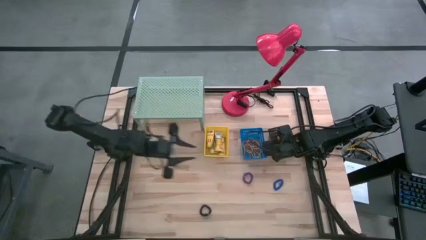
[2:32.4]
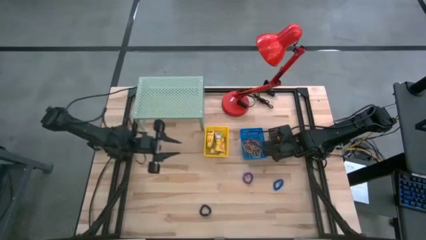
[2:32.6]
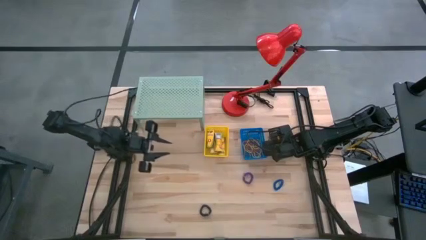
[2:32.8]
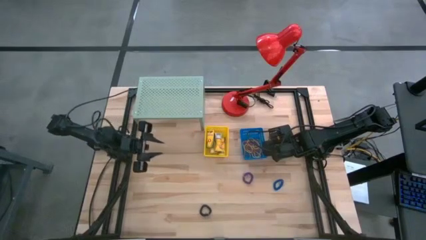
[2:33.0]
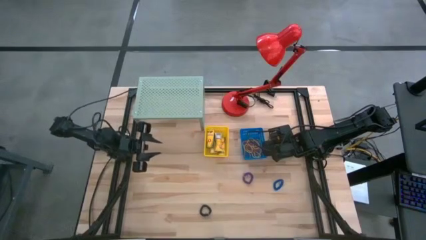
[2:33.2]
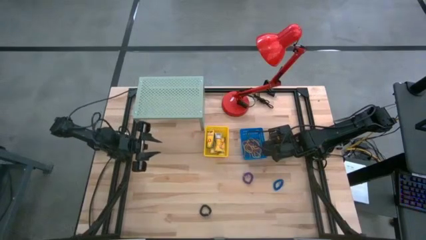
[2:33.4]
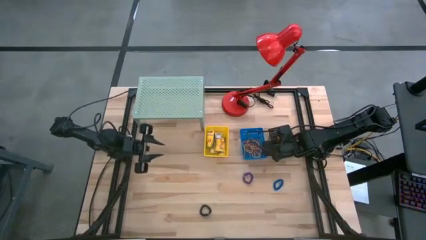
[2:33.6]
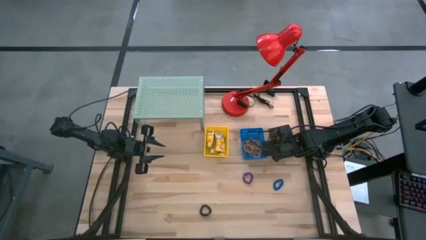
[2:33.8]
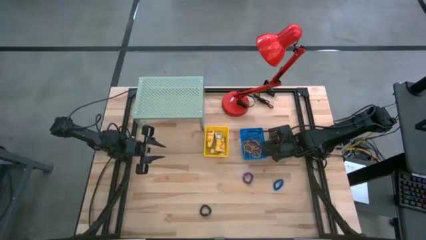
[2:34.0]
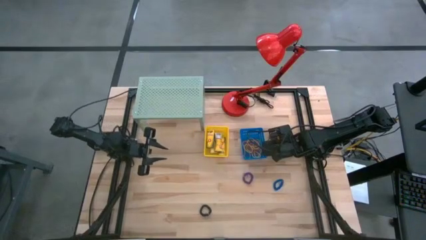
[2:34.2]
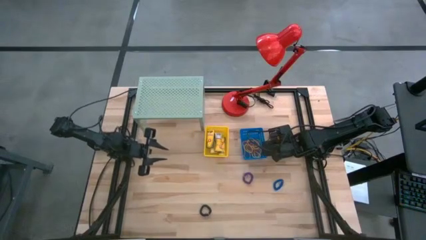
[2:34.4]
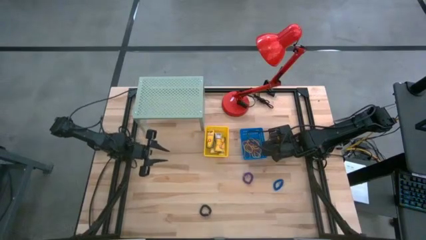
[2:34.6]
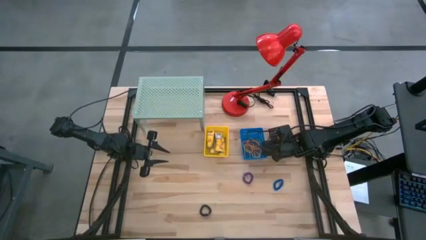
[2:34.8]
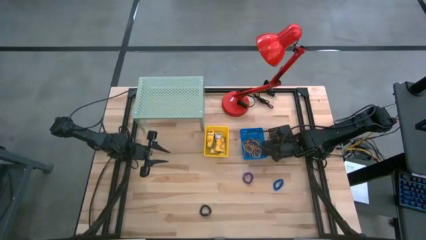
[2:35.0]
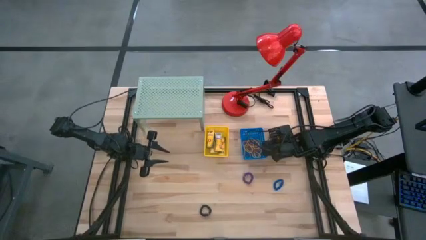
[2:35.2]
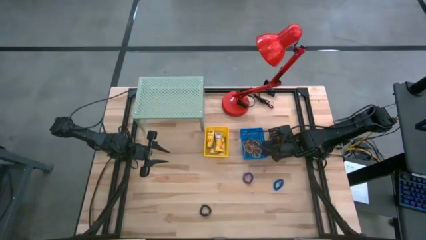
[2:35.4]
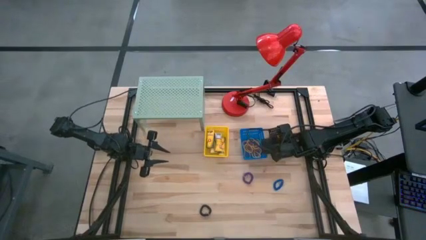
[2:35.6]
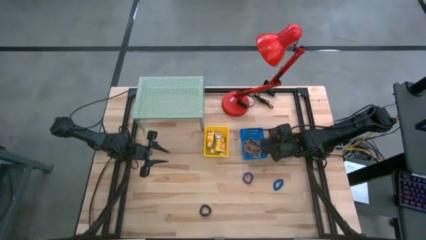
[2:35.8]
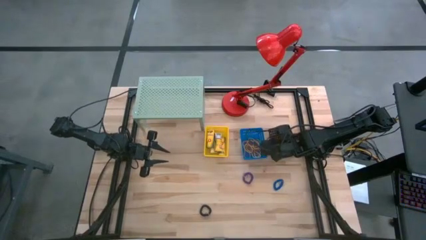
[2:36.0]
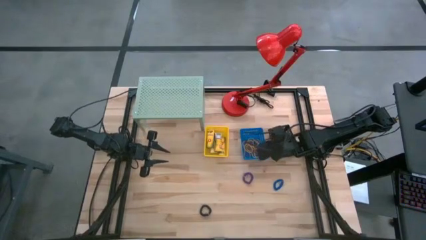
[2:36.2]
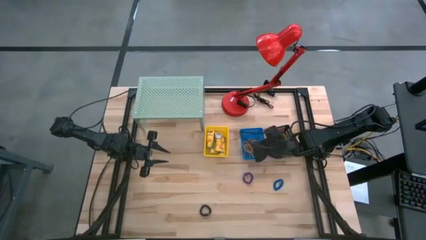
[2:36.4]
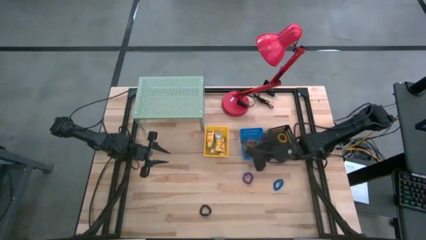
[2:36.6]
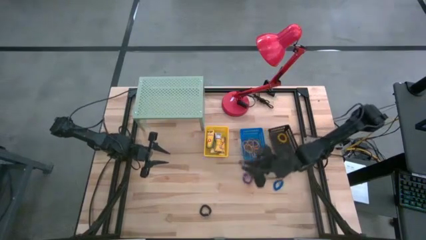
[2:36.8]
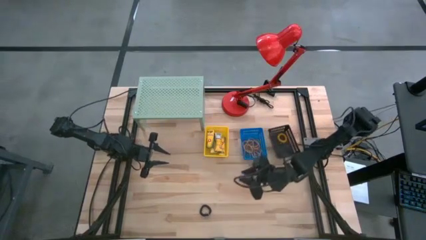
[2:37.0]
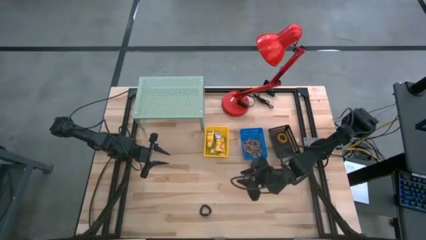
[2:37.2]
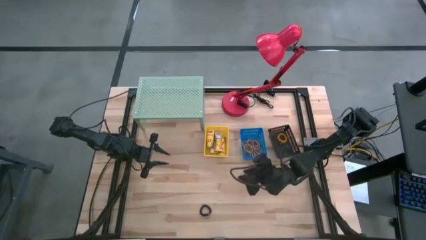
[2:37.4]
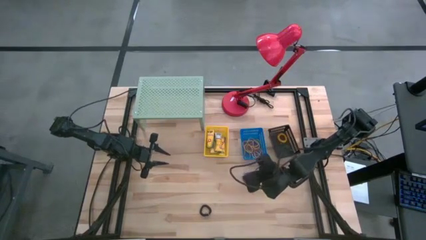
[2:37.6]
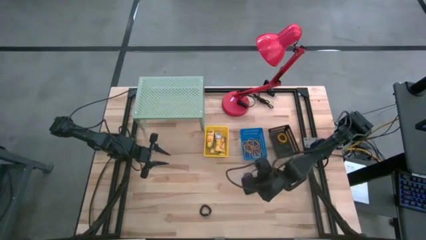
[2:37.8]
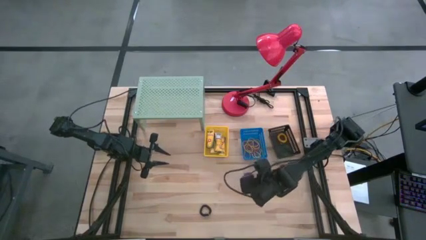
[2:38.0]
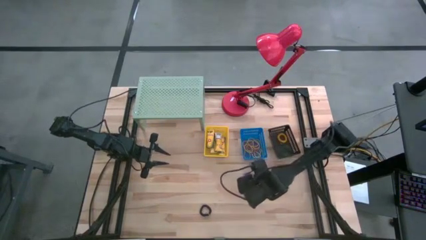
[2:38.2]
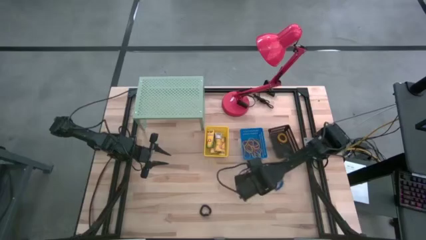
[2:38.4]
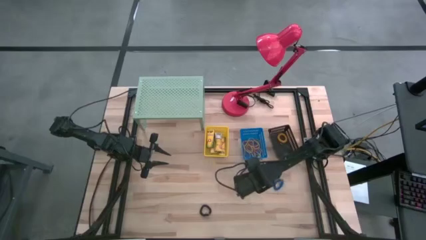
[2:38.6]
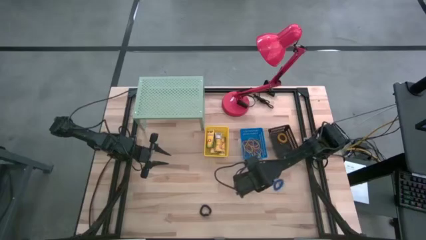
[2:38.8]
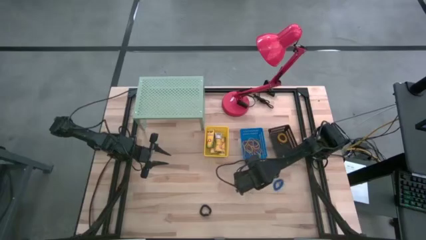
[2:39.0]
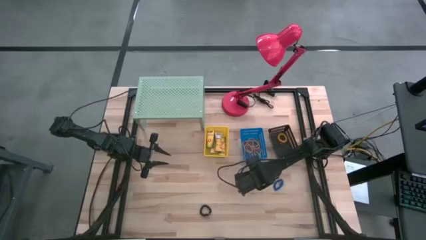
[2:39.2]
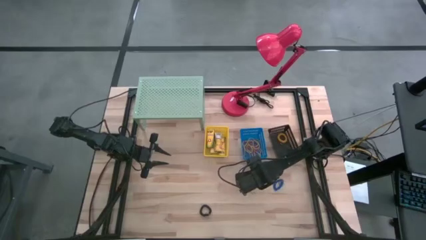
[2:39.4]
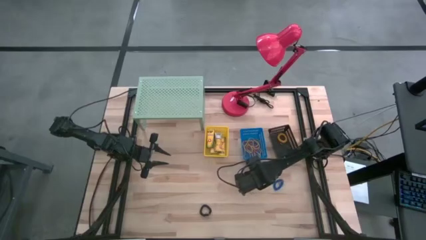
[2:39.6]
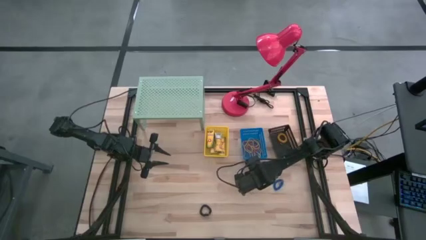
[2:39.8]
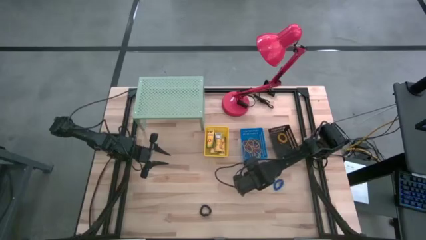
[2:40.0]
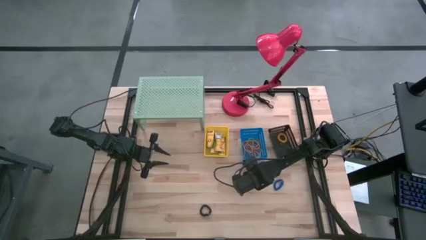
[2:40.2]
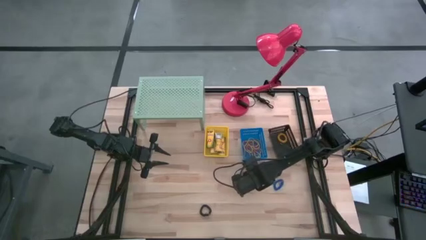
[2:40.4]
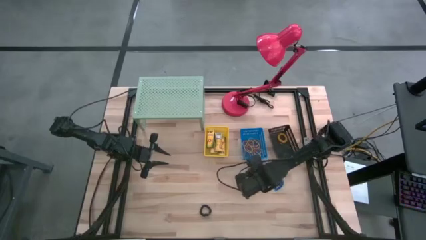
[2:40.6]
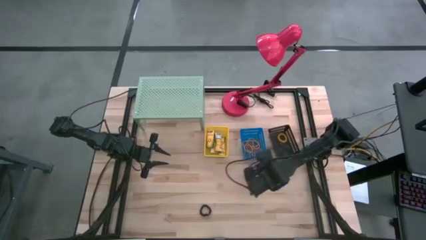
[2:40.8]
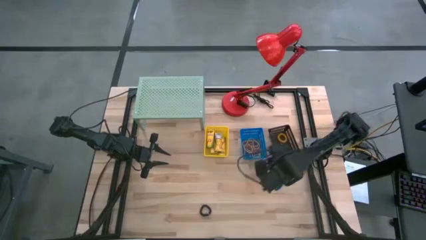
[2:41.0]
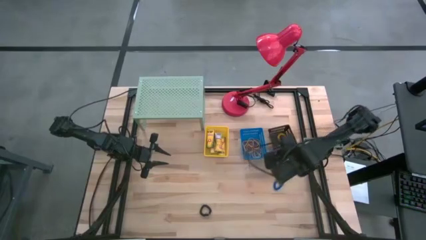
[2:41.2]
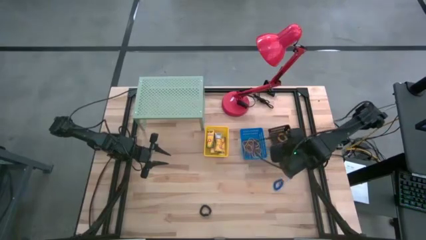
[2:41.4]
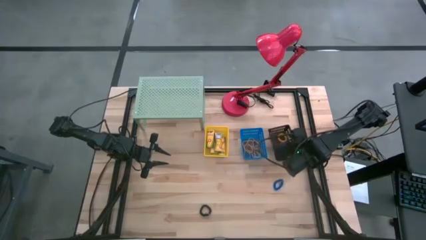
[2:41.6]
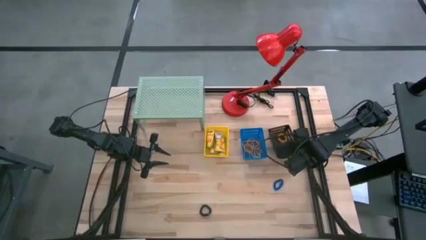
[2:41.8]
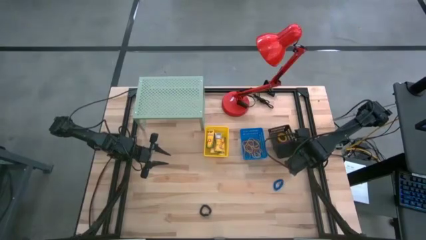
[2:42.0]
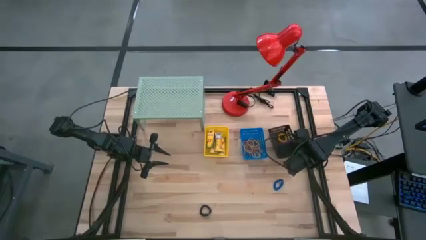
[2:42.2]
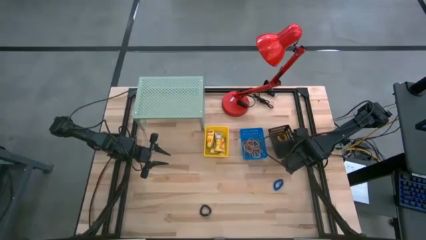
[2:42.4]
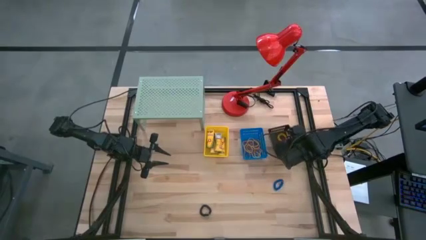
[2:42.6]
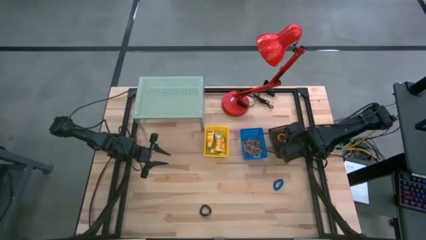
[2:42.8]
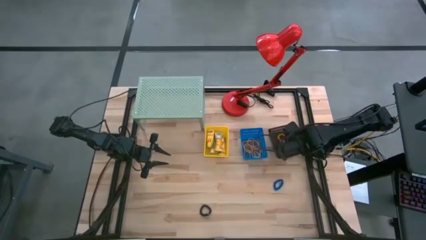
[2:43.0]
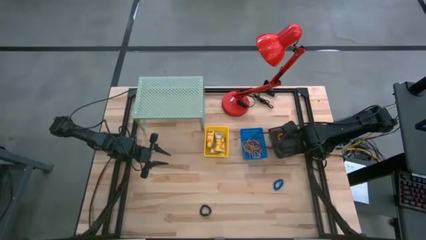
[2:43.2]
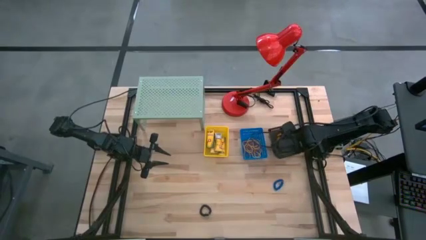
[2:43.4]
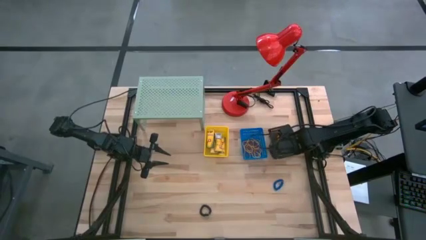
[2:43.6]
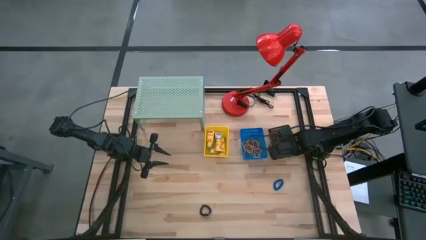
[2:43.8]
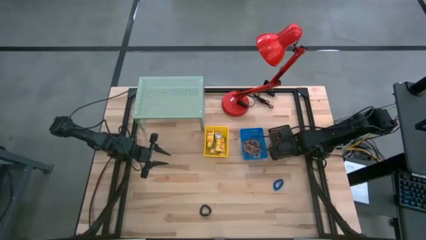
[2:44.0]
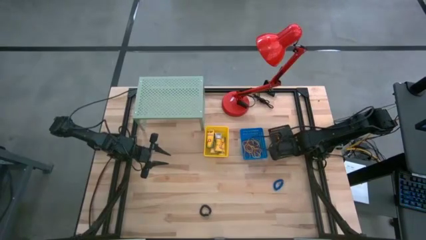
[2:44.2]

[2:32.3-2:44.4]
Task: Pick & Place Office Desk Supplies
Put the violet spring keychain into the black basket

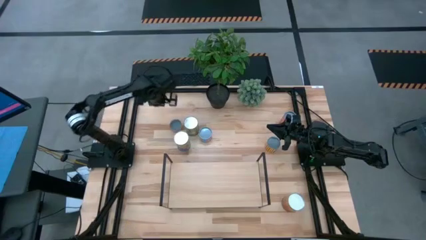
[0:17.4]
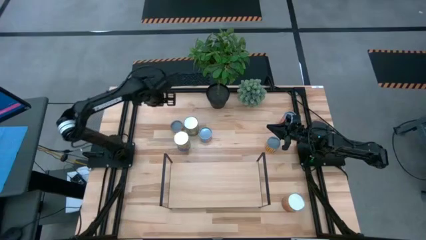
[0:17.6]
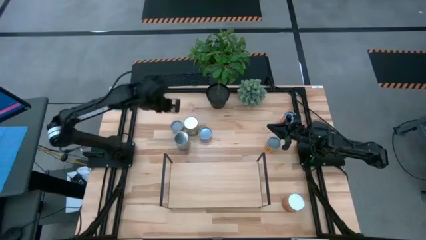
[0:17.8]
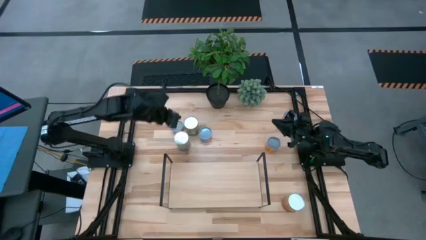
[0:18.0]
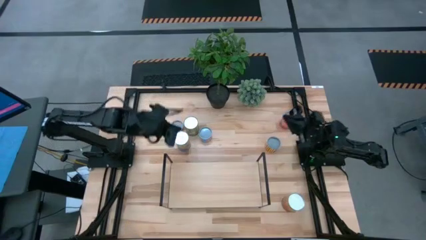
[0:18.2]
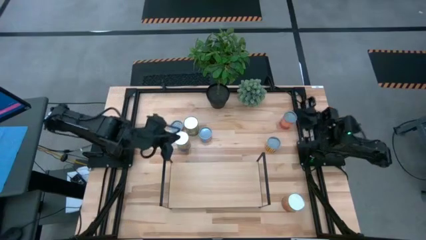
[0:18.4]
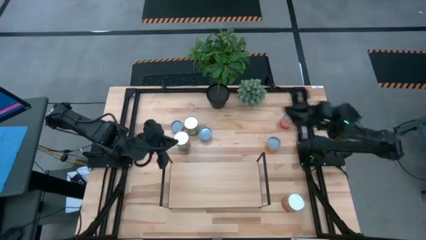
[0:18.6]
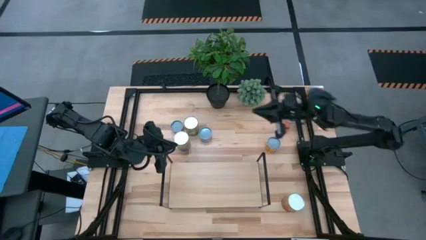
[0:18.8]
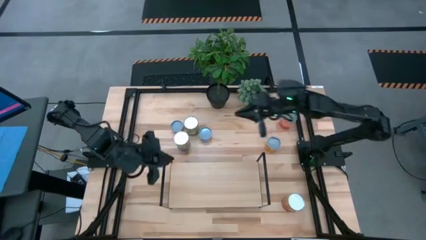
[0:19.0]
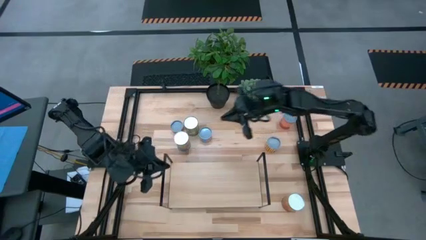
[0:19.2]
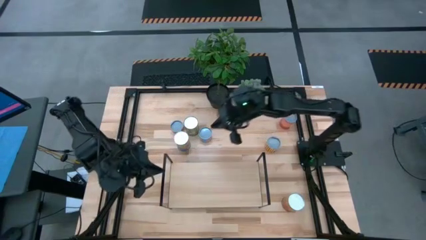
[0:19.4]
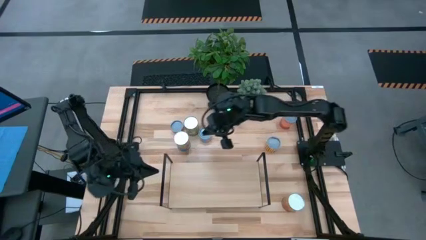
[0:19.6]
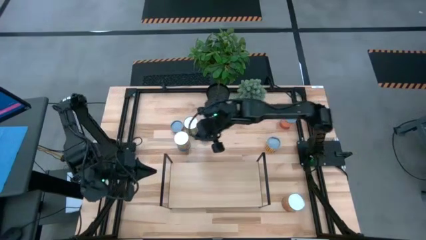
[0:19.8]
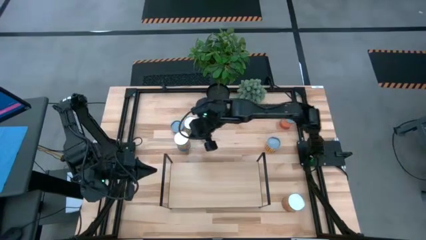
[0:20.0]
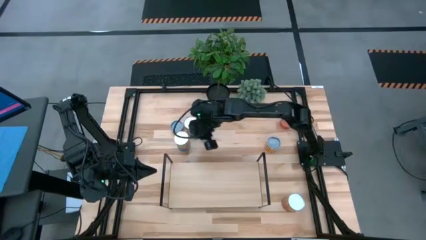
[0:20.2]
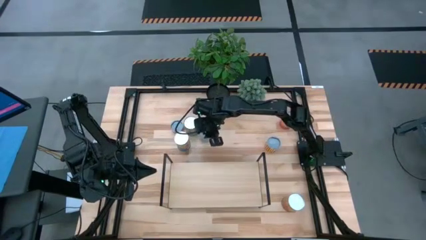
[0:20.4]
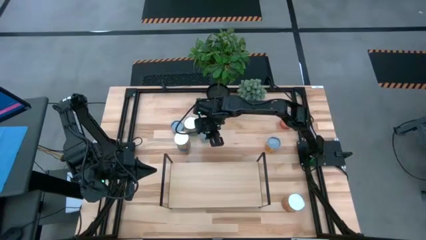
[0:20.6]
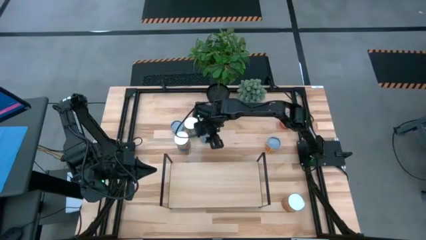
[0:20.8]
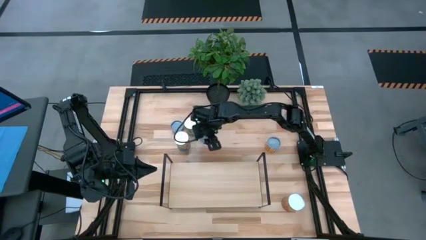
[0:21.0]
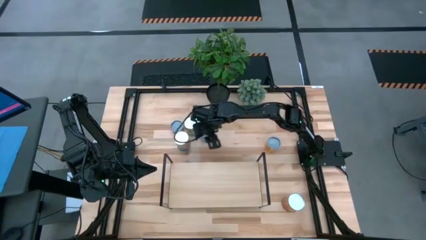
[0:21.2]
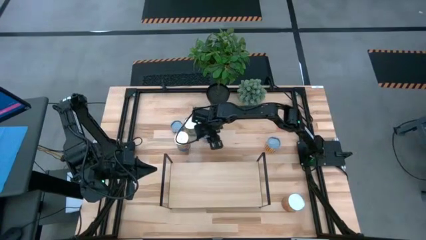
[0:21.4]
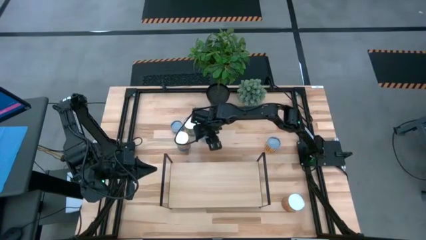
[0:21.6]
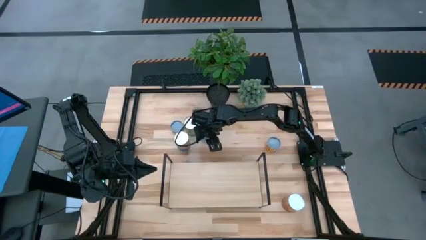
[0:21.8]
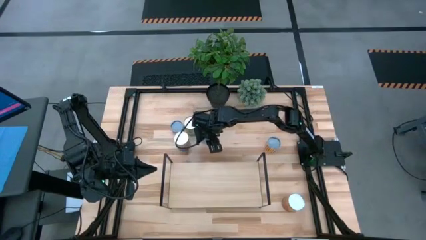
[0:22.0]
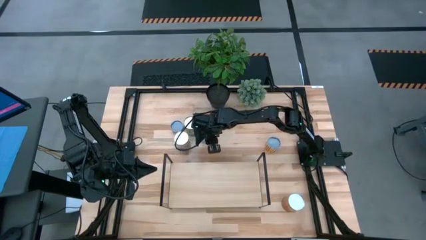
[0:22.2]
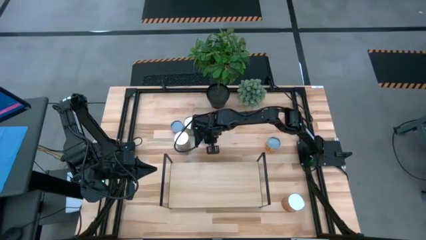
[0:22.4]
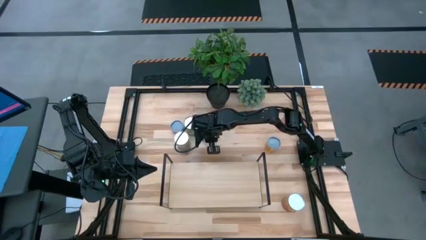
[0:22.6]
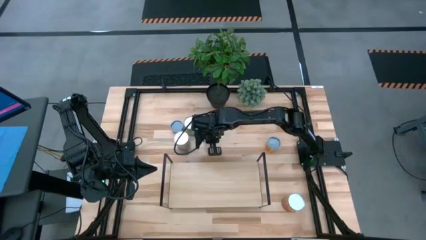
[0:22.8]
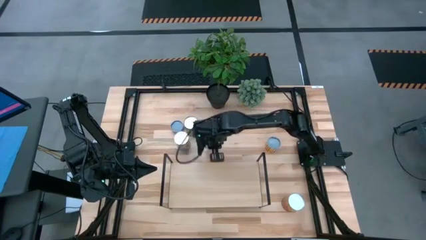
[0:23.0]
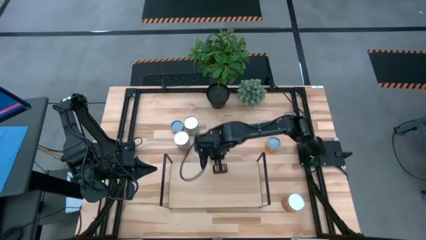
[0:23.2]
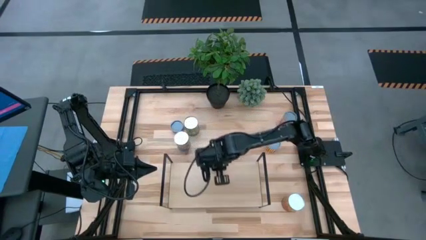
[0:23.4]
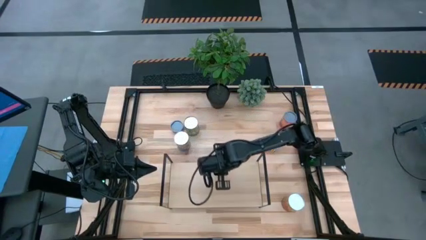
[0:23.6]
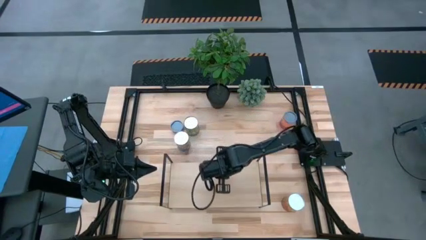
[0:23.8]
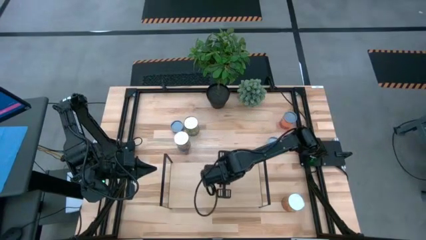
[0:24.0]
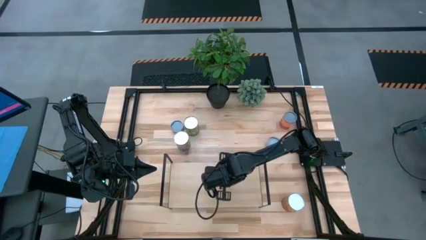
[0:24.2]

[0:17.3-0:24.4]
Task: Pick and place cans onto a shelf
Put the blue corn can on the shelf
